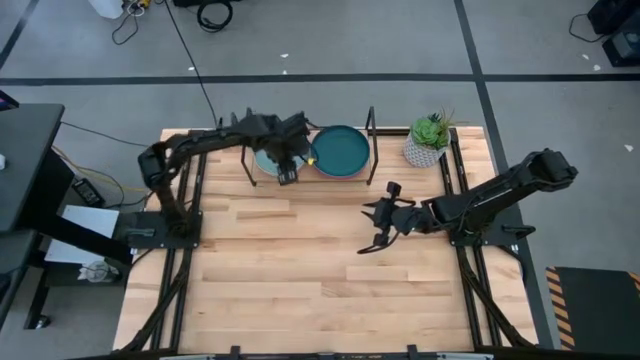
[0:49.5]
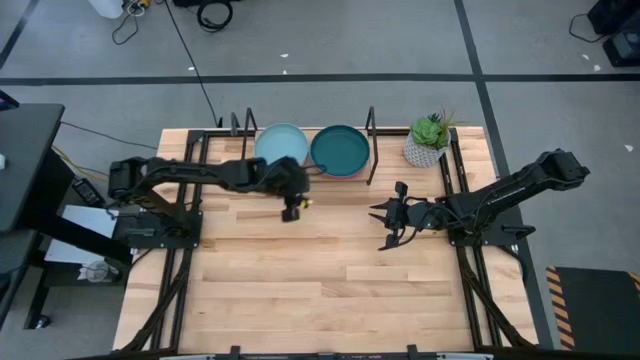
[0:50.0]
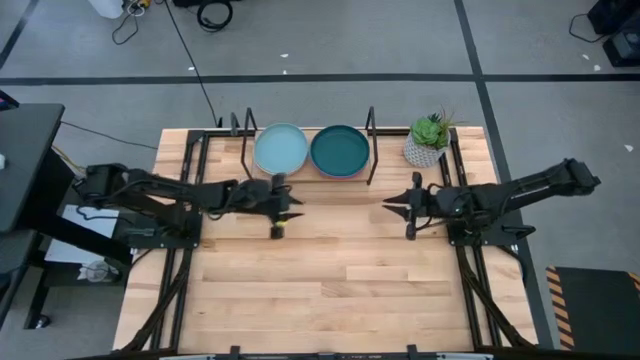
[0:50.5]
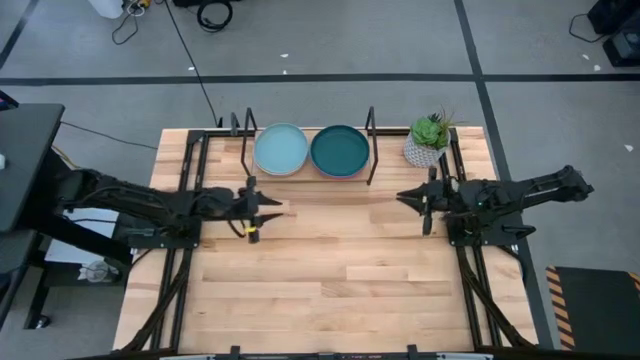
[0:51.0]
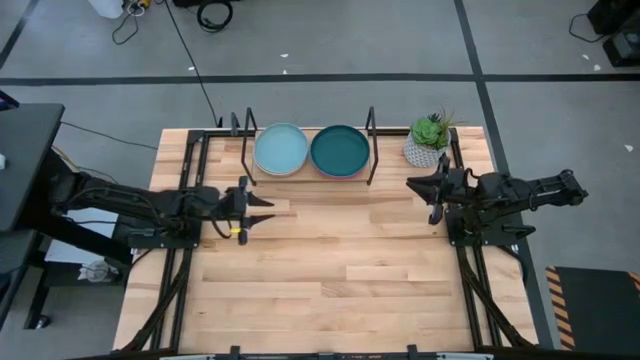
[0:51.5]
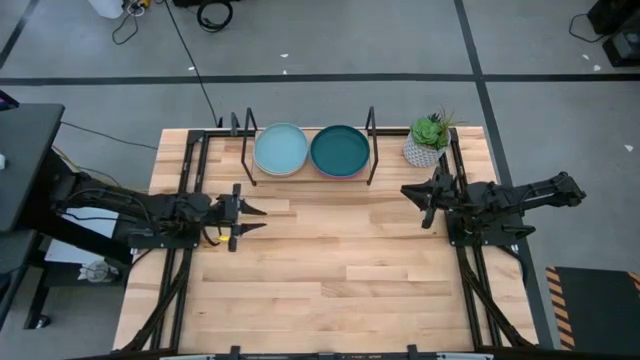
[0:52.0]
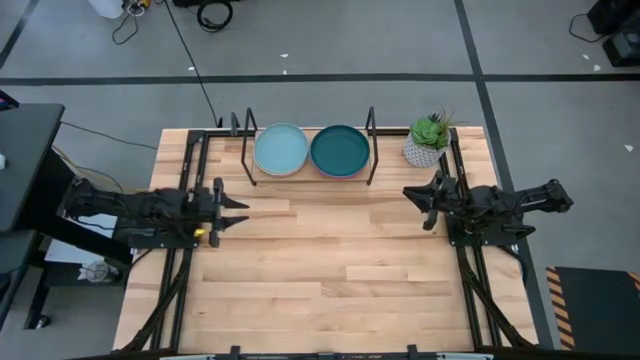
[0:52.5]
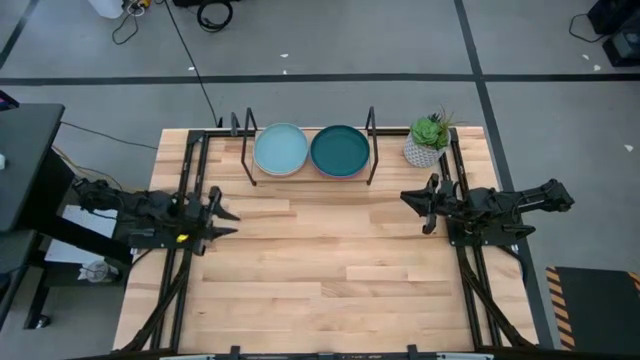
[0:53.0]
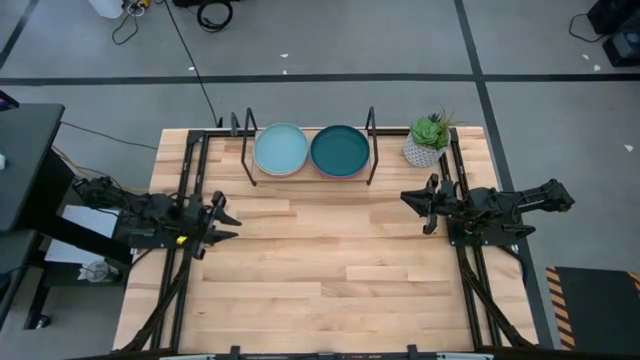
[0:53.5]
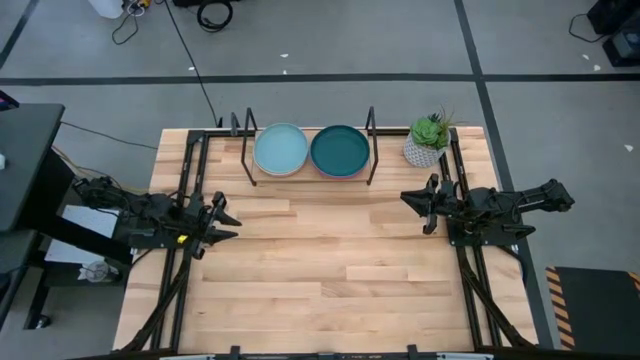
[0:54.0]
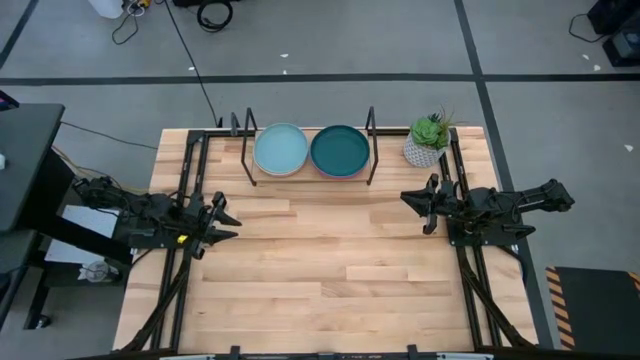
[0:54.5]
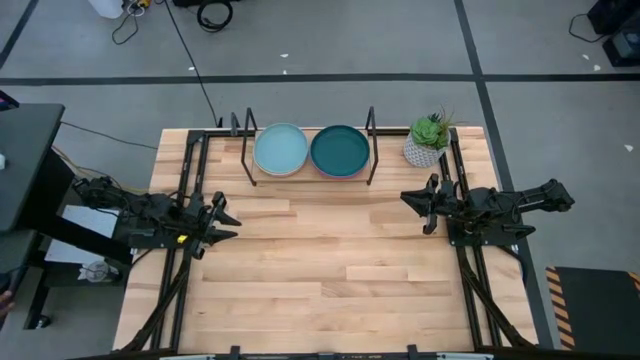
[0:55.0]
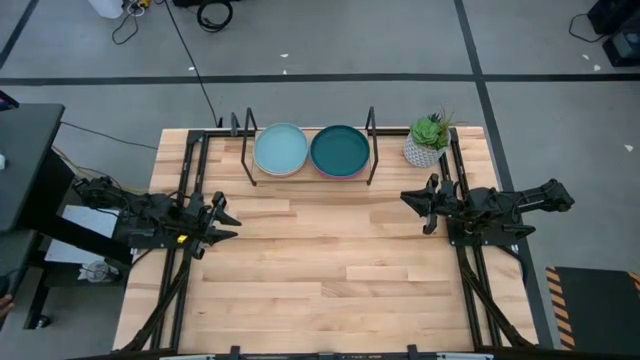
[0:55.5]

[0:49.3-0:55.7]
Task: Place and stack plates onto a shelf
Return to Home Position

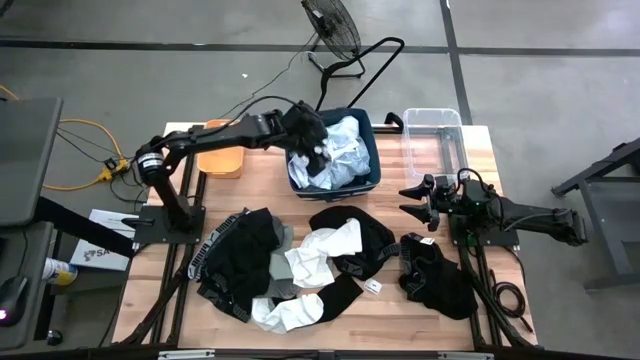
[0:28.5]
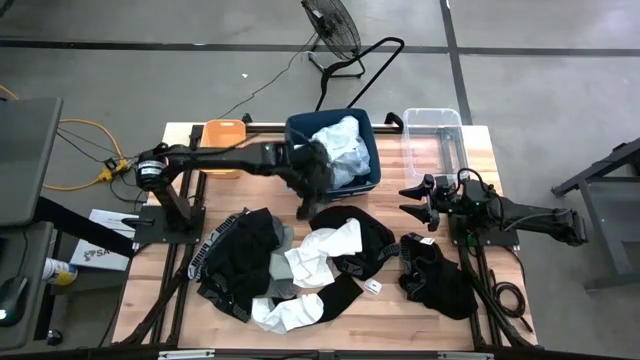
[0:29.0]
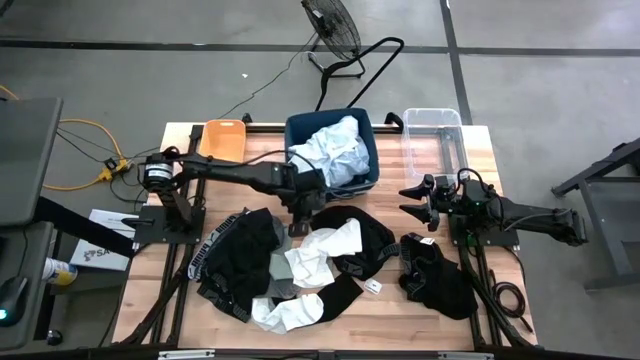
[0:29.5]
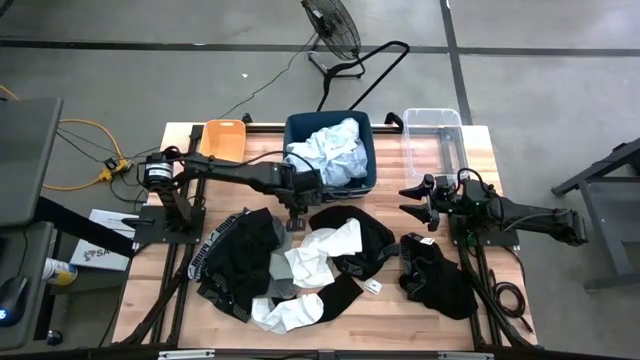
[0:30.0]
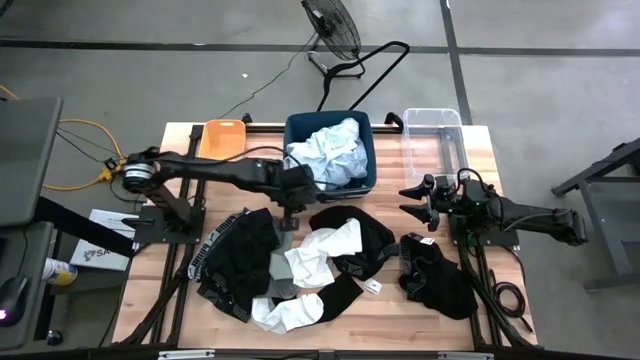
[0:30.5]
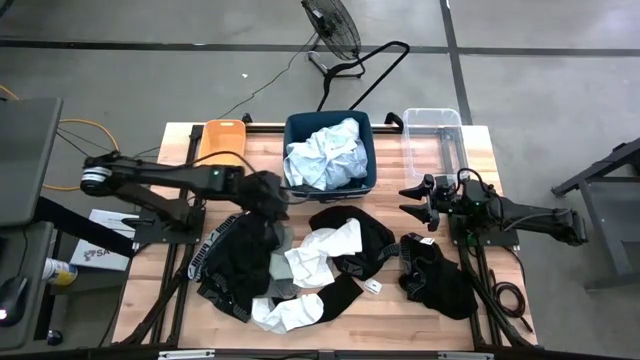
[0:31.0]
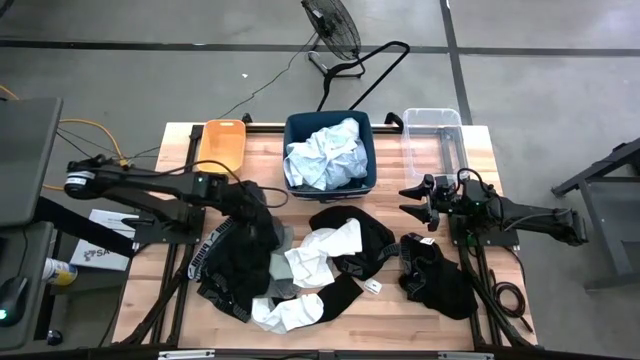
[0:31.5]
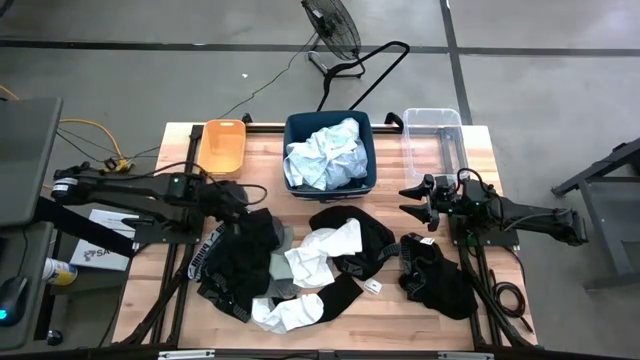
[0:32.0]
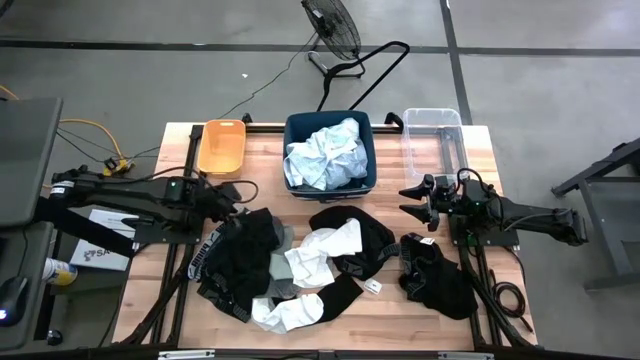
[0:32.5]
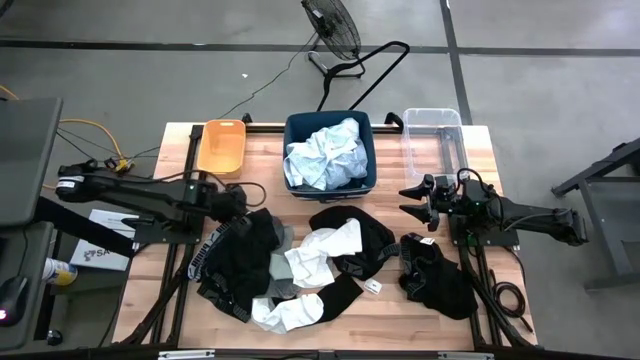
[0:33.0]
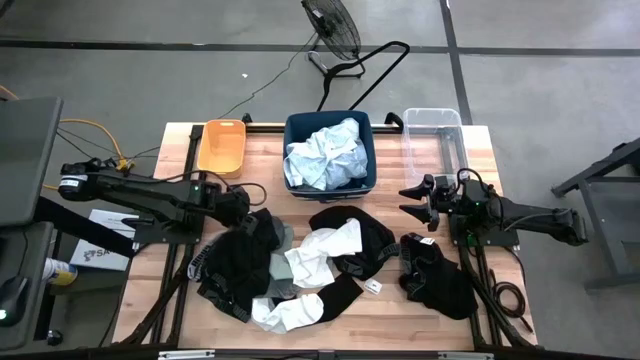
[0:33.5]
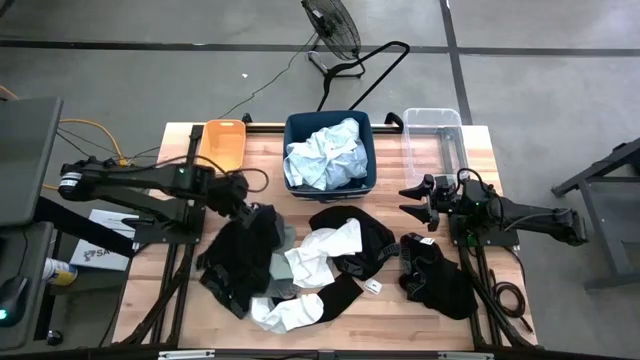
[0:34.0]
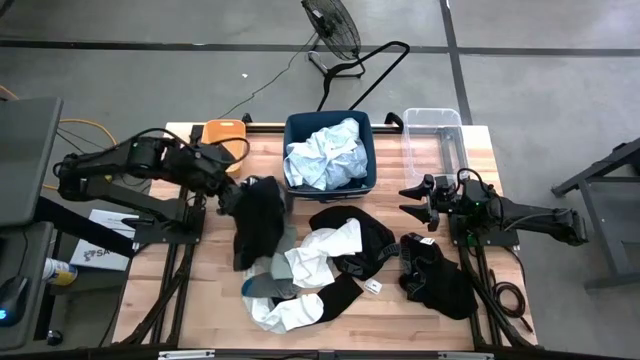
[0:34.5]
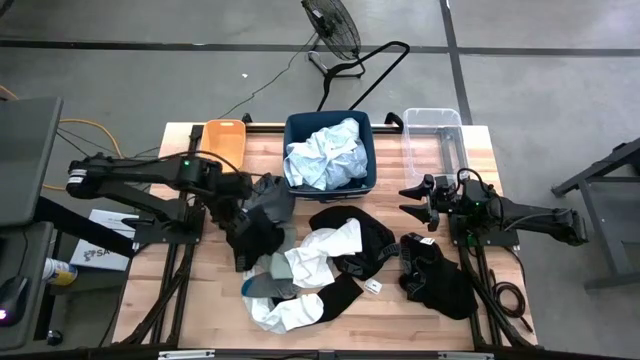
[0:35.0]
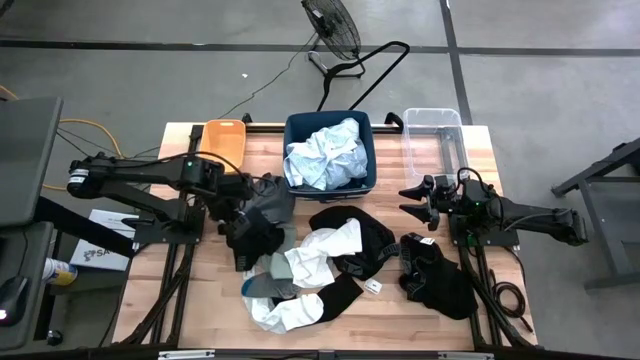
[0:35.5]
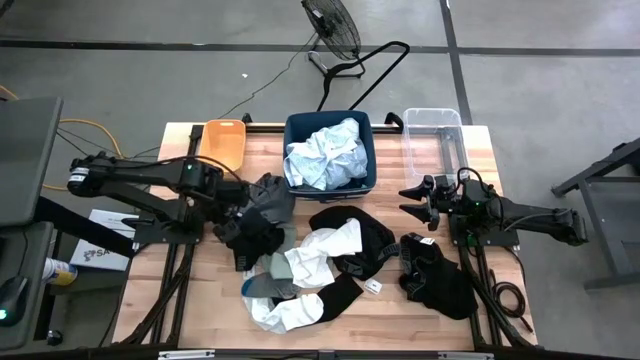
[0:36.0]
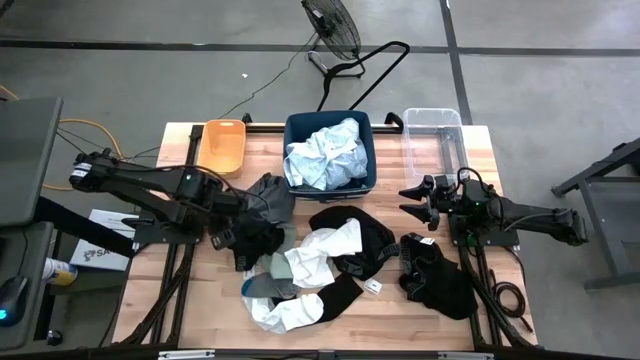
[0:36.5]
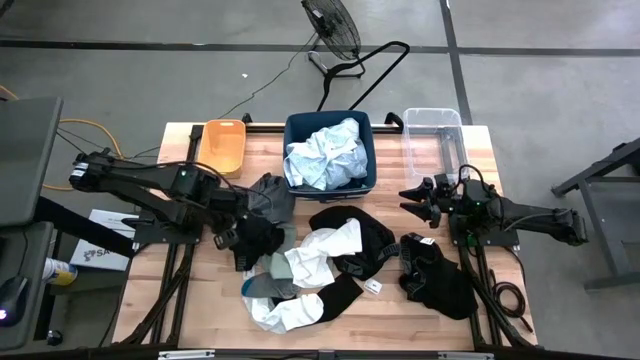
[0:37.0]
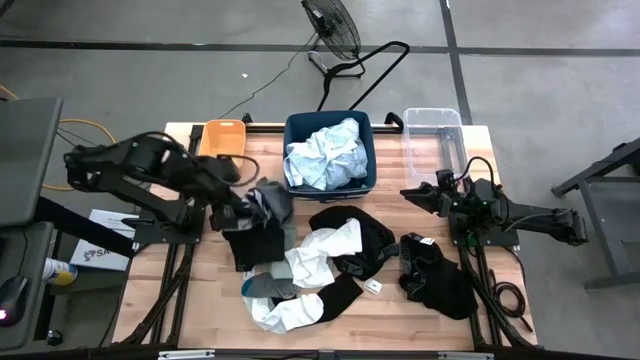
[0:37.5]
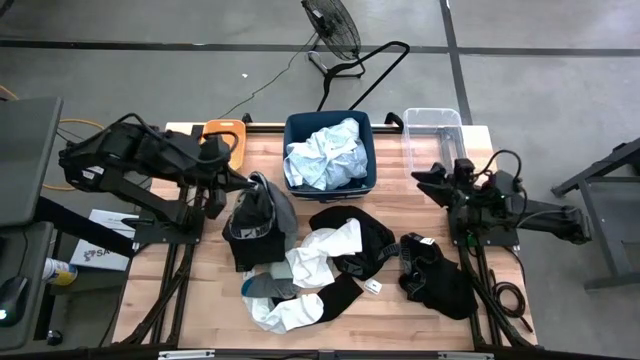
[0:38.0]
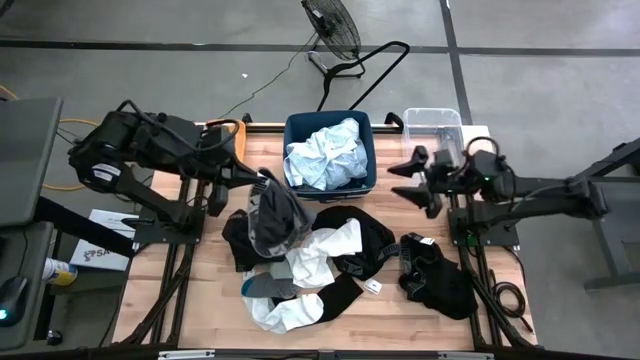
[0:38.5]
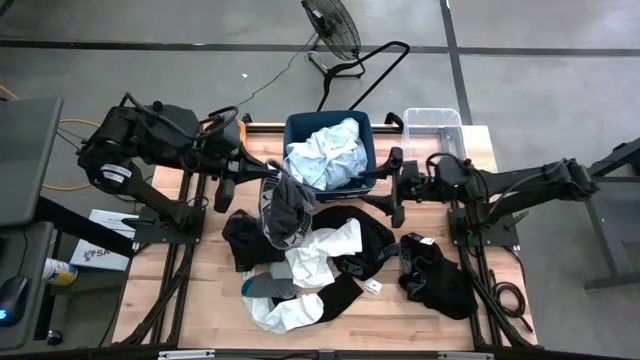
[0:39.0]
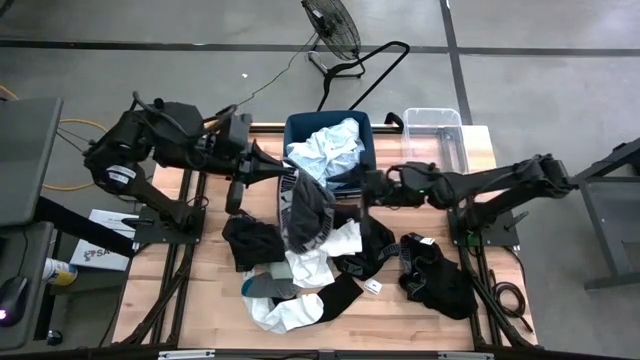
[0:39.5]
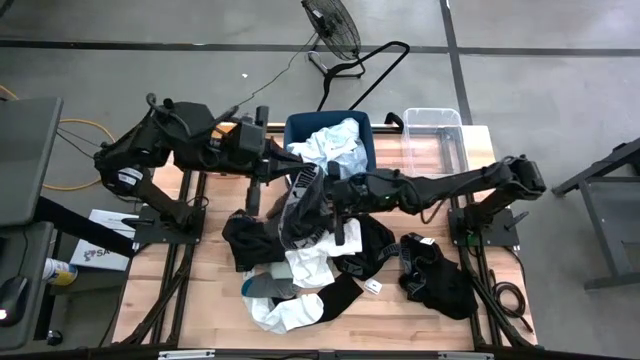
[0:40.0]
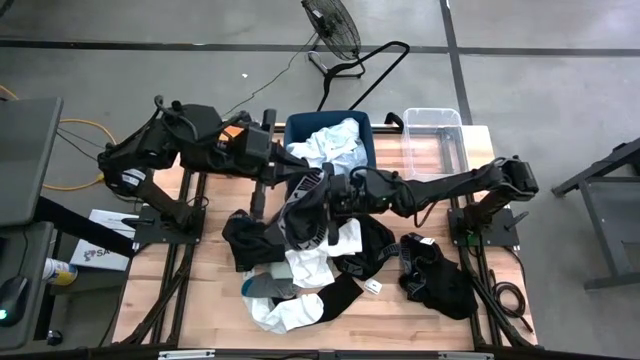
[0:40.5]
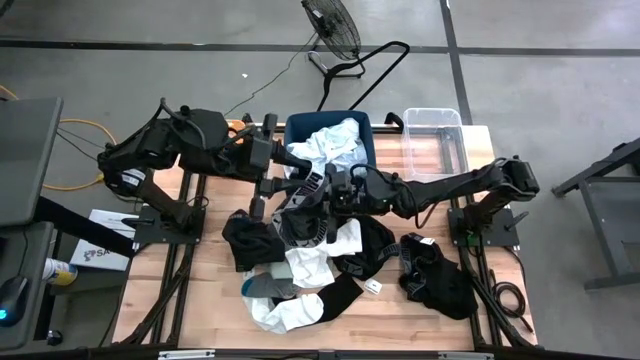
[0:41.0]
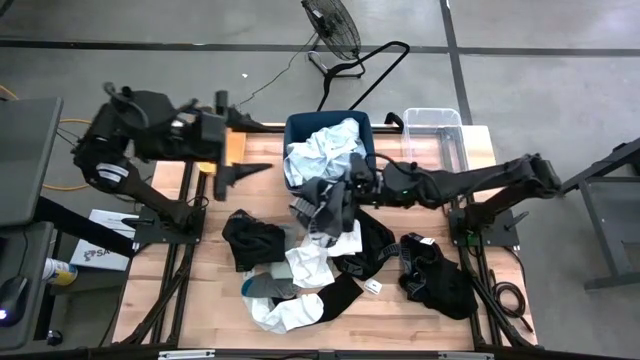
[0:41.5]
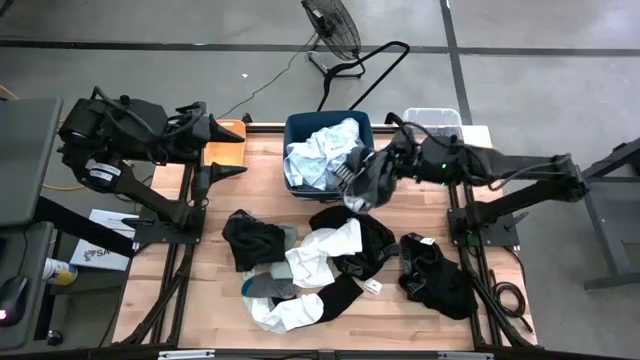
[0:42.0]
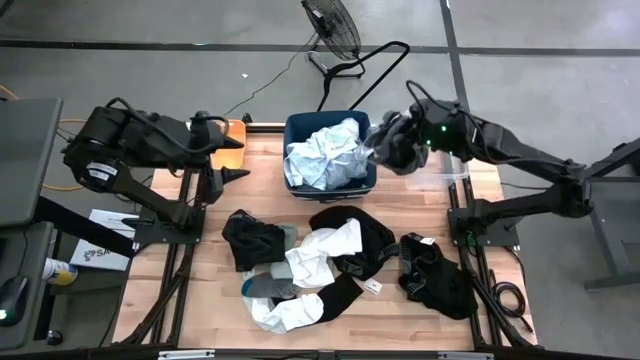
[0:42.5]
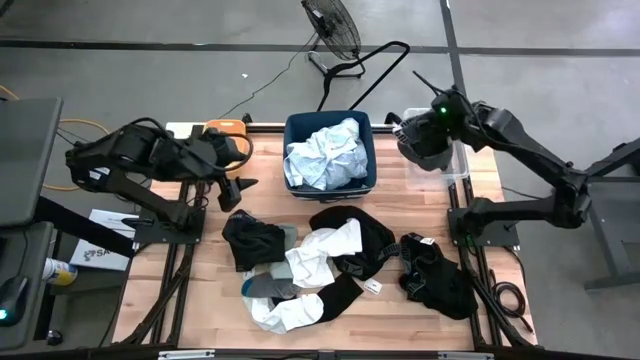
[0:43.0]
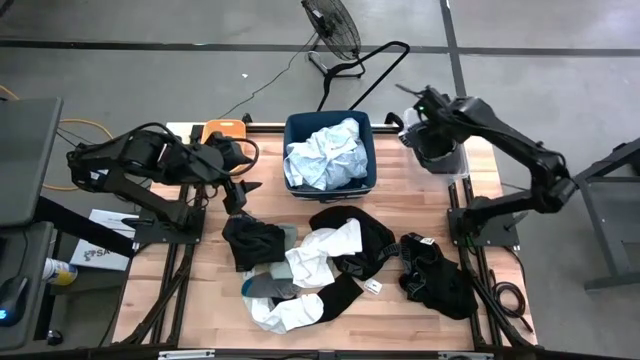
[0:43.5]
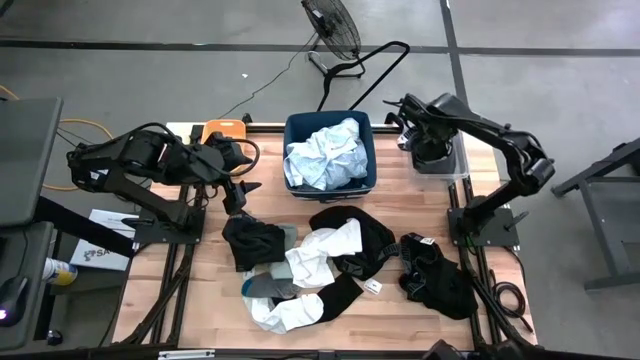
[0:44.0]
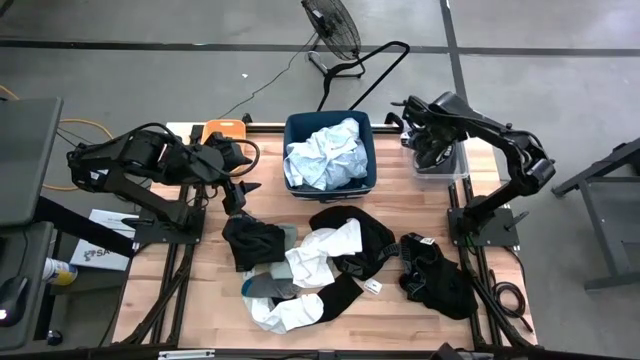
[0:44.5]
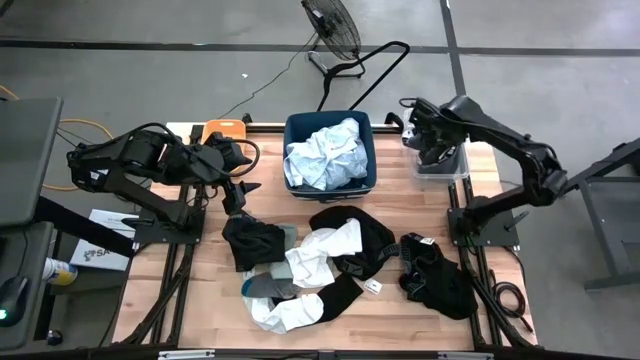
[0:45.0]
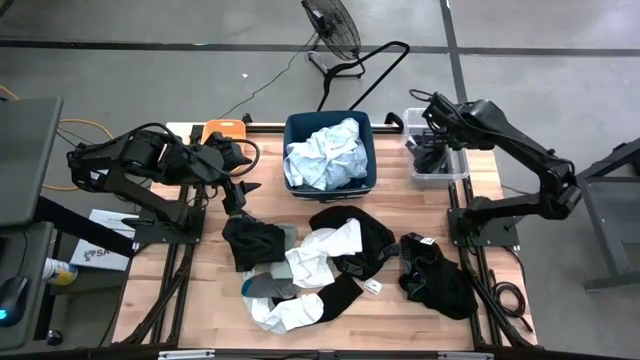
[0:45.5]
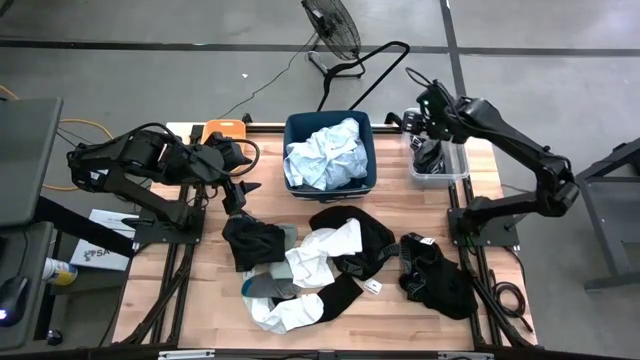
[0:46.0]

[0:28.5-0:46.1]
Task: Pick & Place Cloths
Put the gray boxers into the transparent bin
